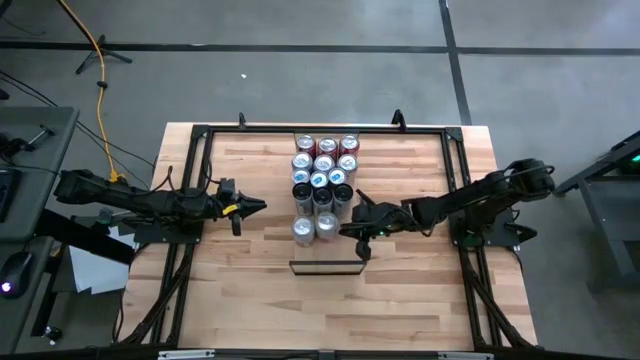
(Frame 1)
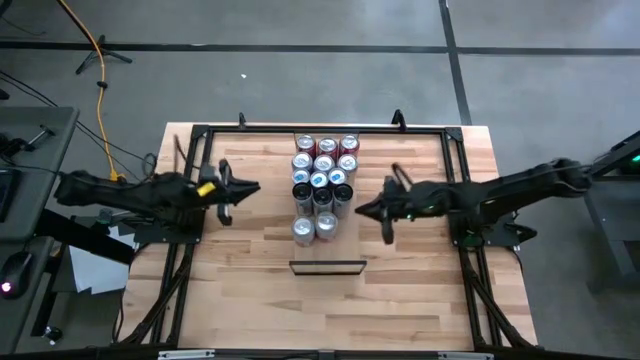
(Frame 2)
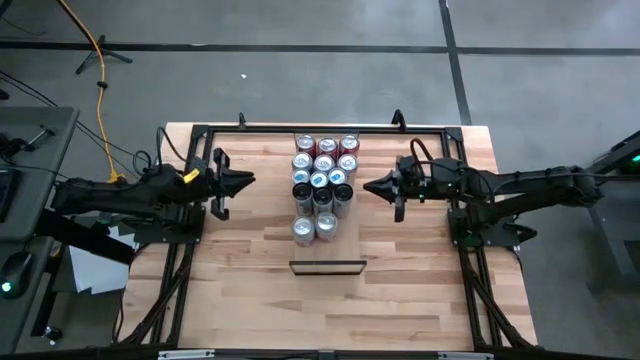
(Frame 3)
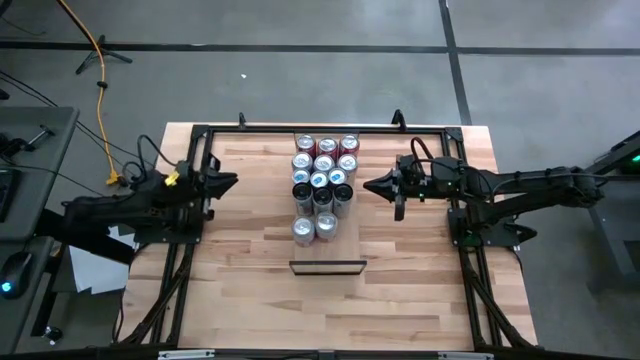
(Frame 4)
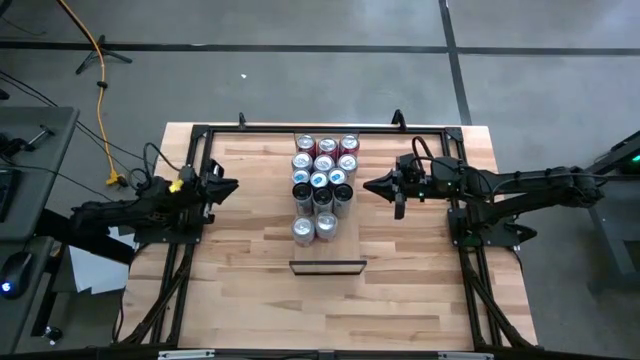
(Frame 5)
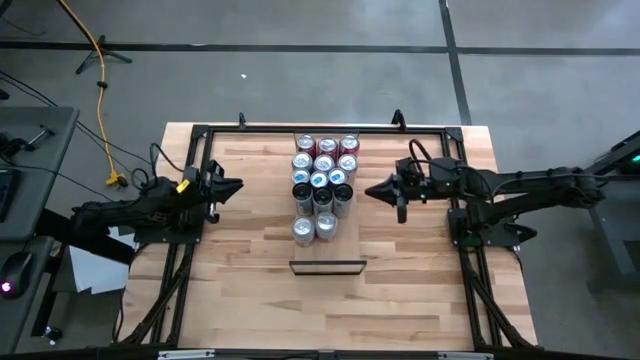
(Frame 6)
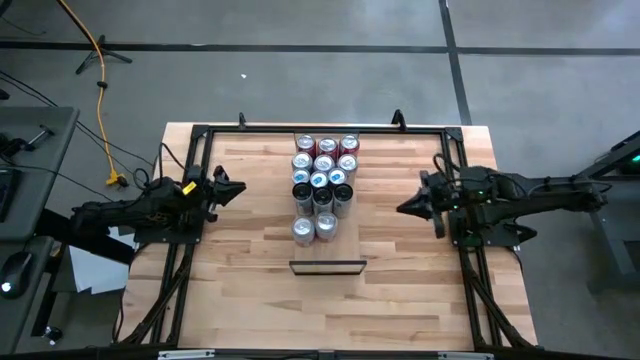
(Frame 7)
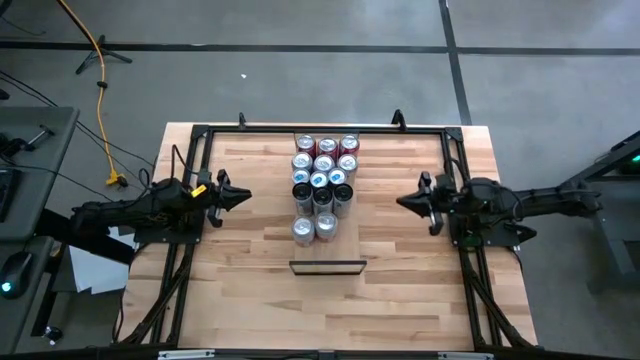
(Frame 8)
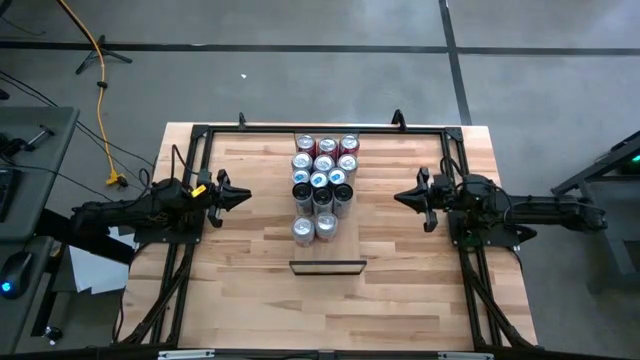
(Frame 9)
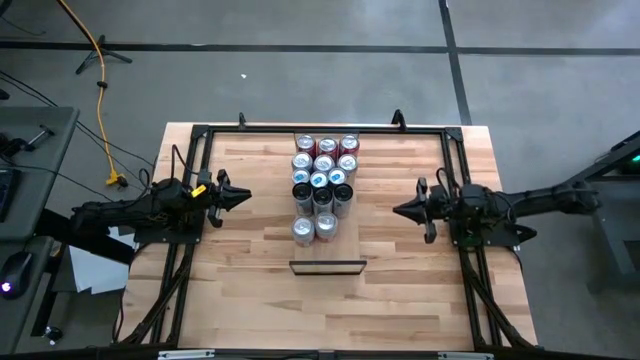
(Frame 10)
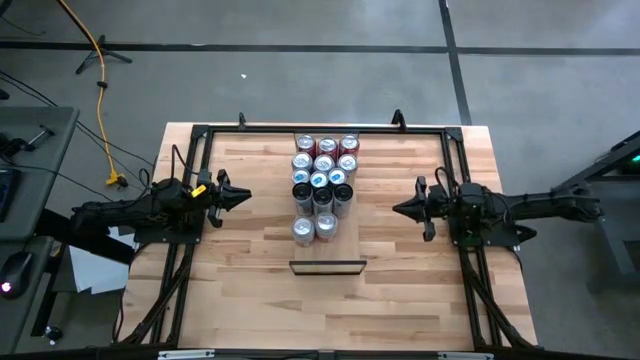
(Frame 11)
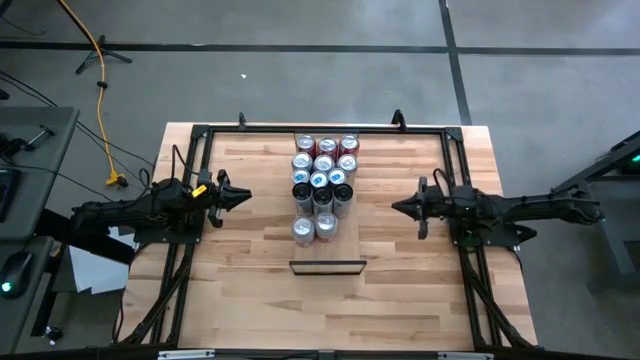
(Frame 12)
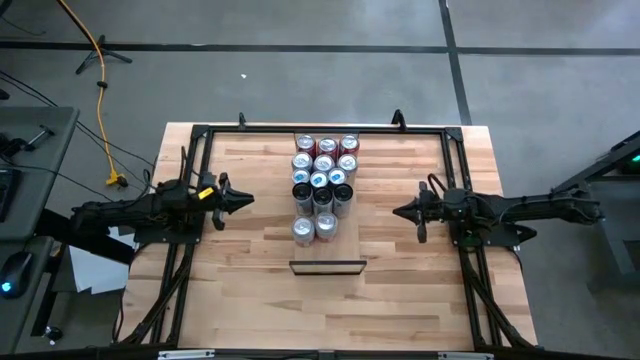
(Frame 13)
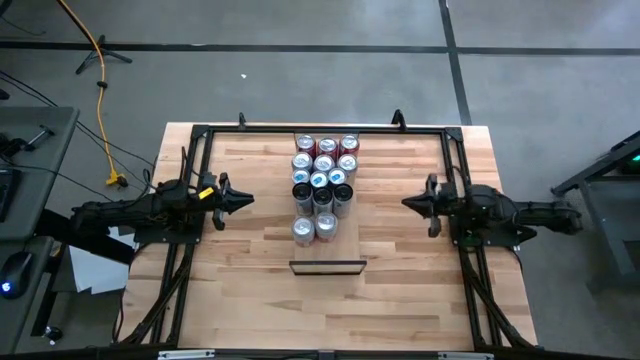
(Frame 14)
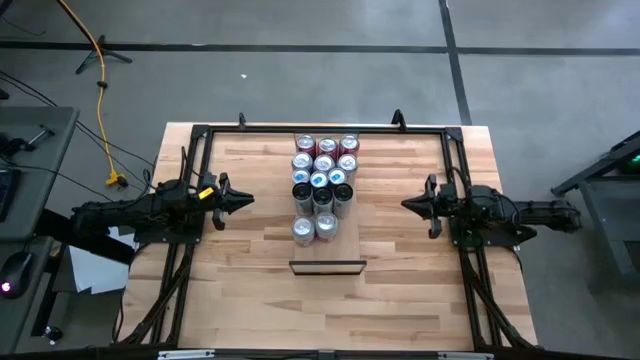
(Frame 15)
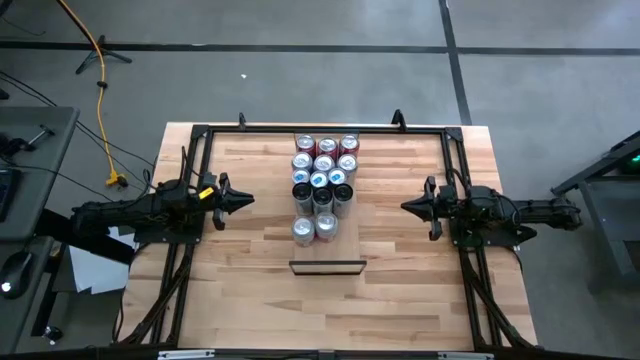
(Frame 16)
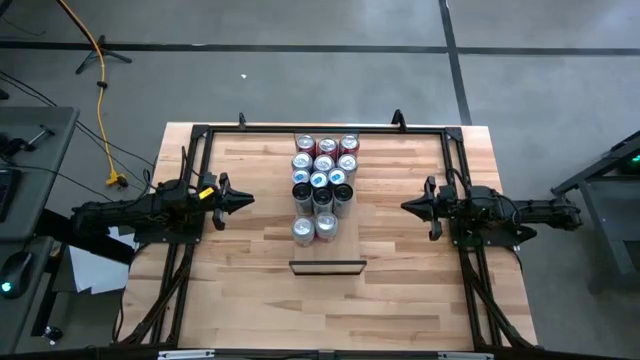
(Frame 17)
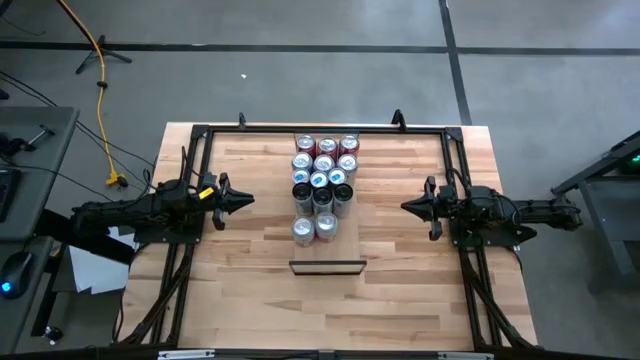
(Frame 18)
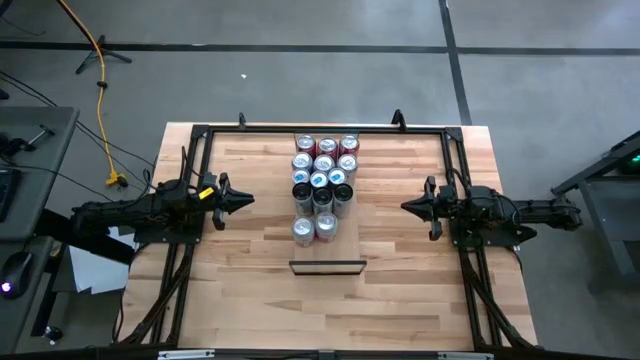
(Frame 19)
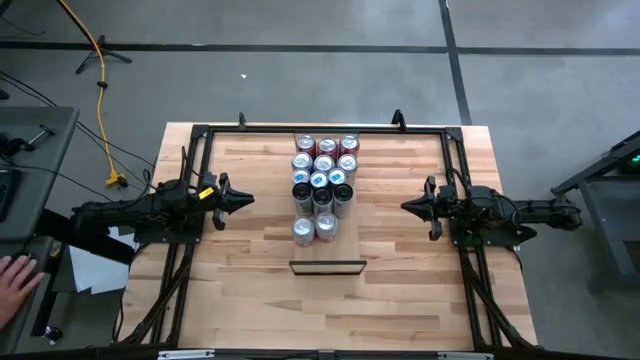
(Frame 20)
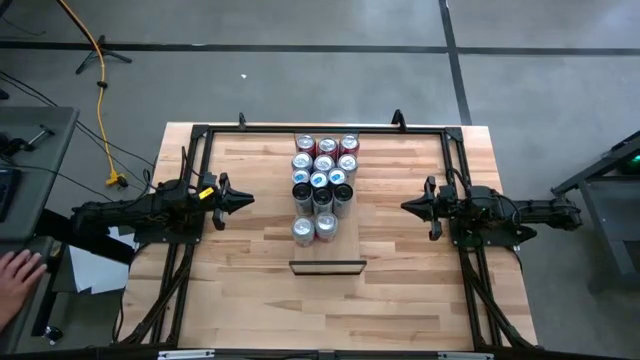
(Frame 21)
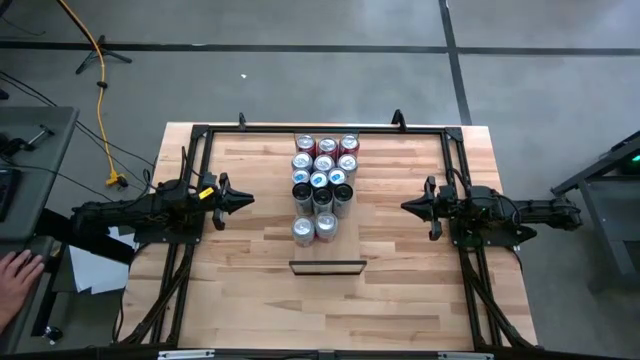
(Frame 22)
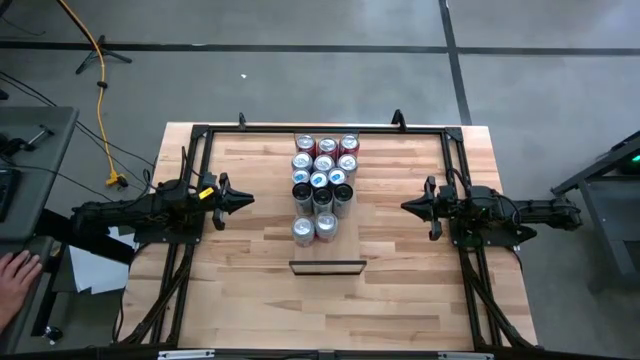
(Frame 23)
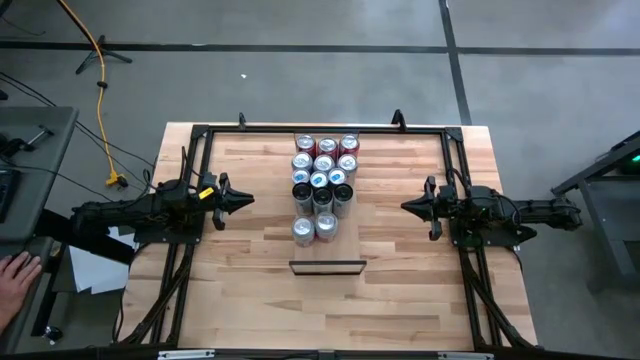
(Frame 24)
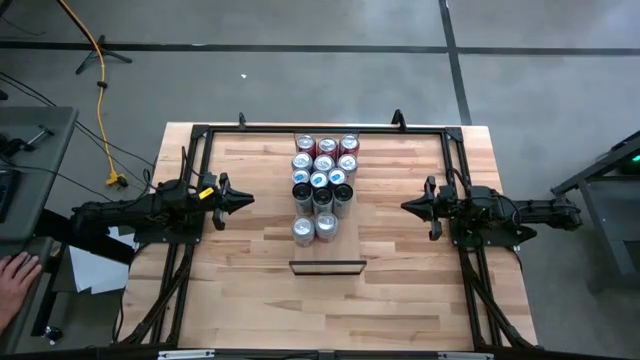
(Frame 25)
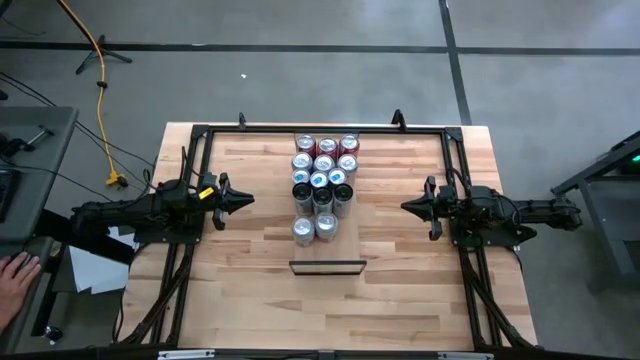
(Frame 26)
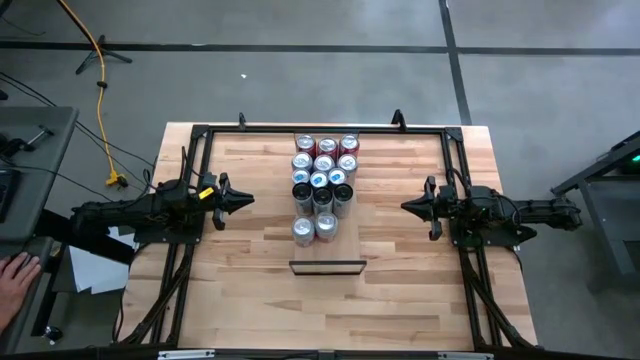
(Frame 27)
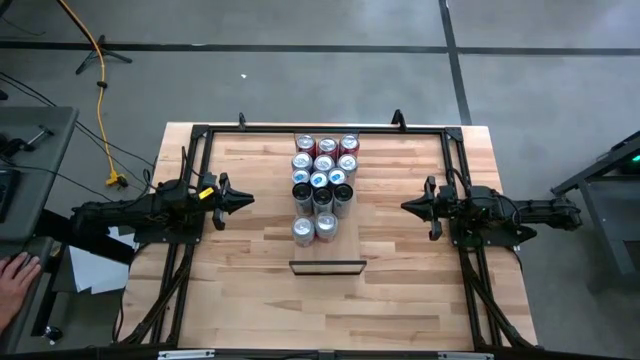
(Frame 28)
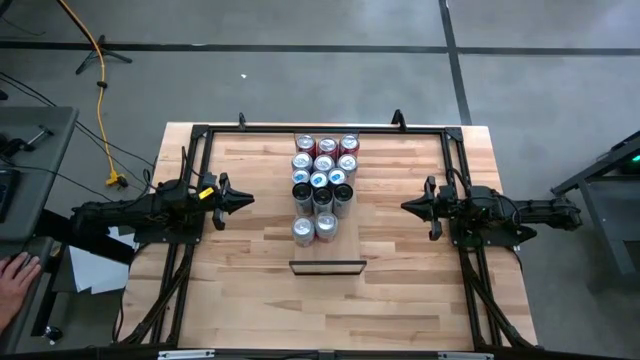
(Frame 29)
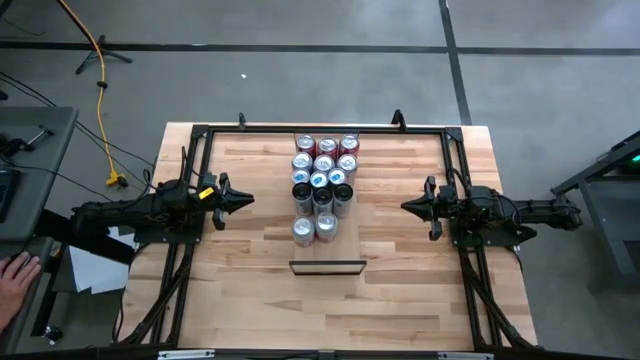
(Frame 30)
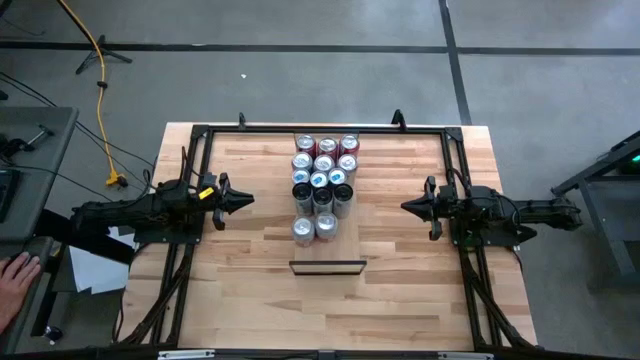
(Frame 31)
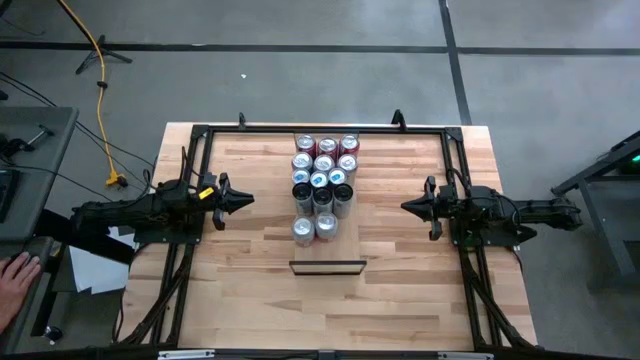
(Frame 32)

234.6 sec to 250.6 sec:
Task: Place canned beverage on shelf
Return to Home Position

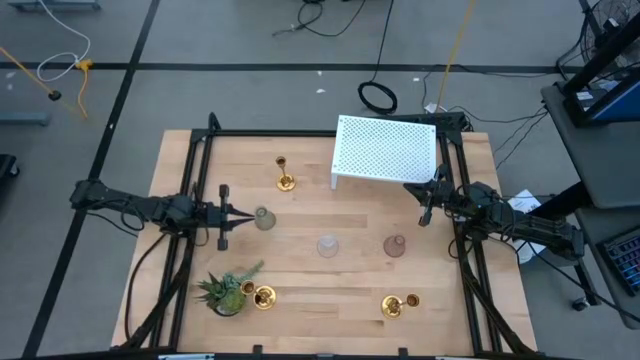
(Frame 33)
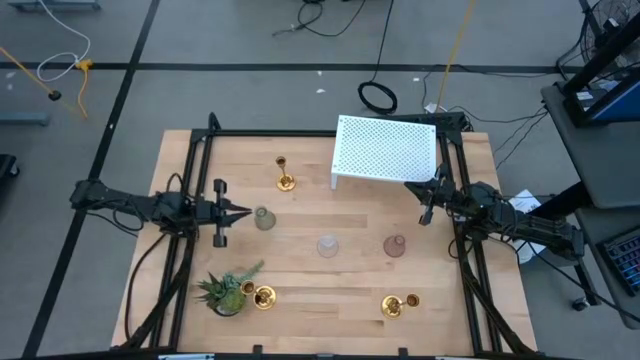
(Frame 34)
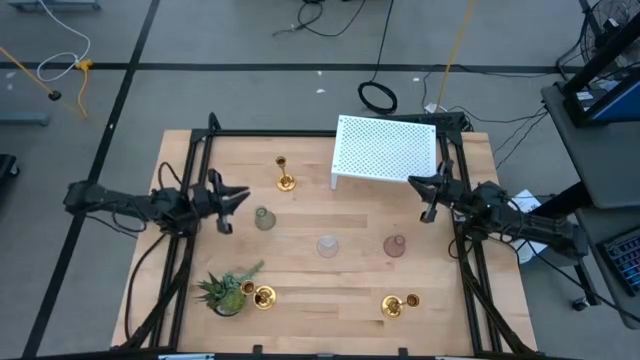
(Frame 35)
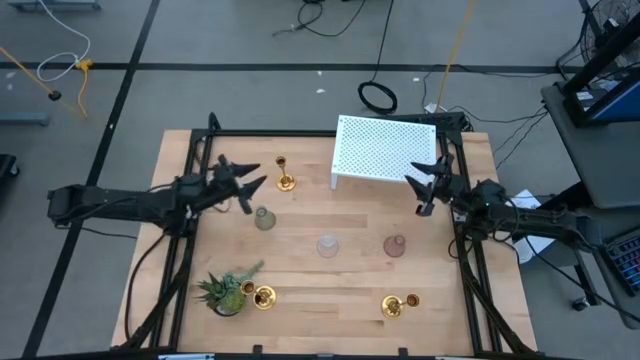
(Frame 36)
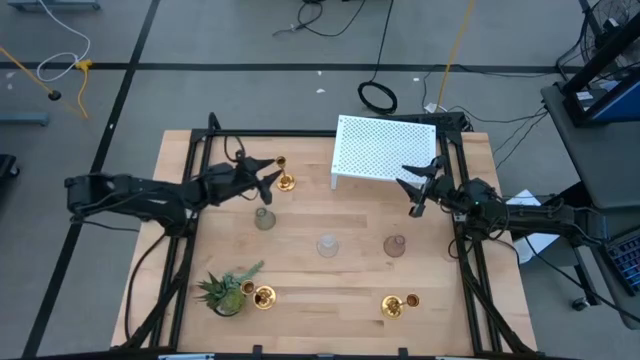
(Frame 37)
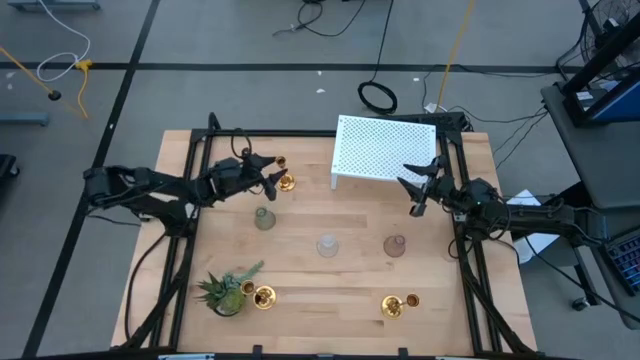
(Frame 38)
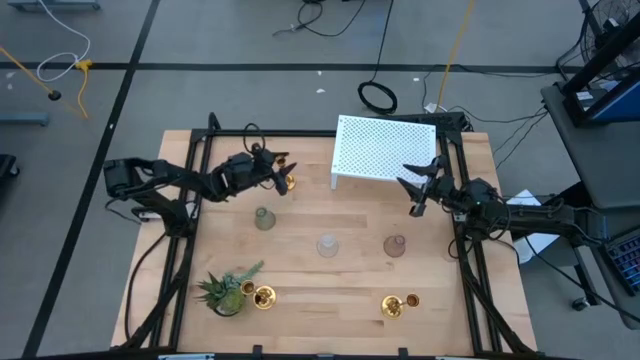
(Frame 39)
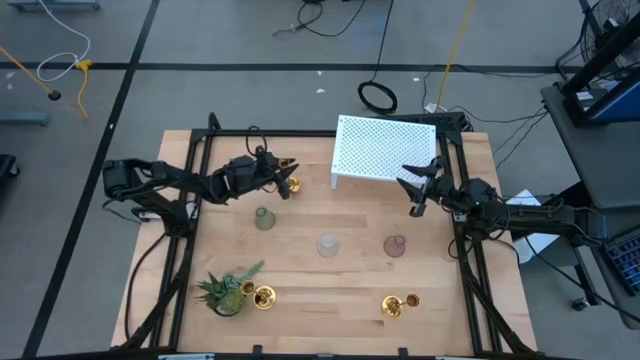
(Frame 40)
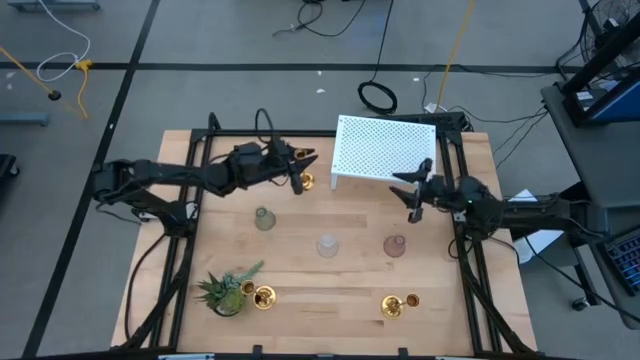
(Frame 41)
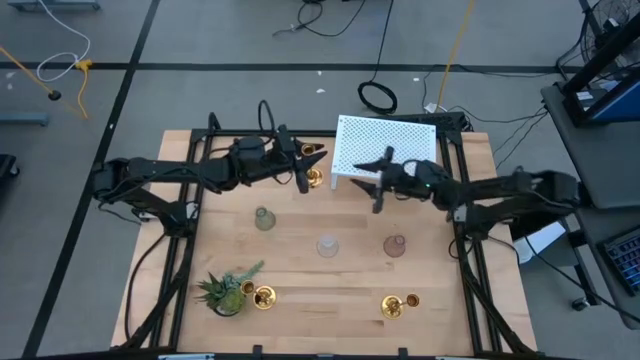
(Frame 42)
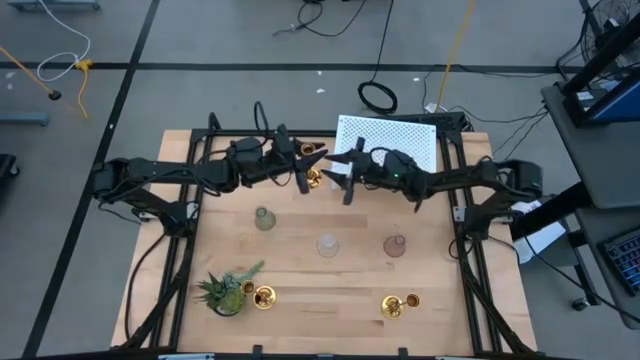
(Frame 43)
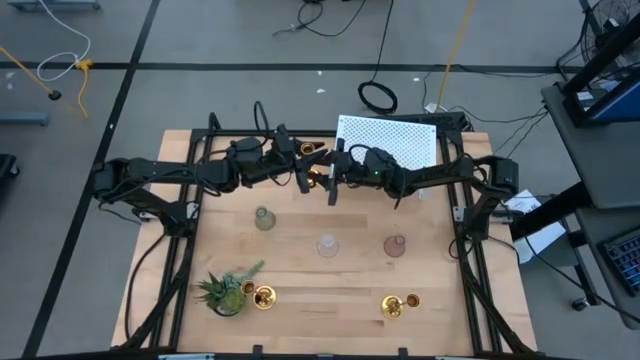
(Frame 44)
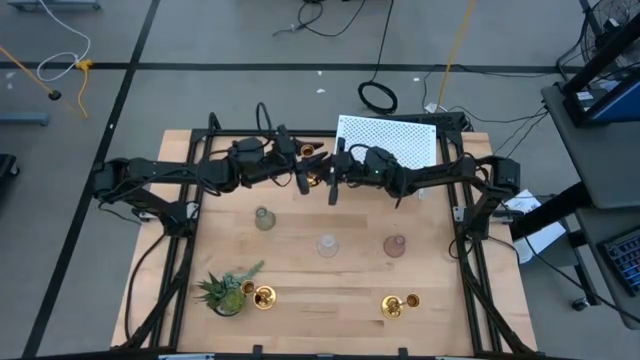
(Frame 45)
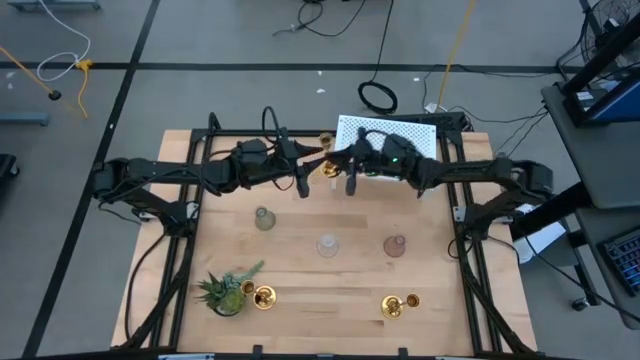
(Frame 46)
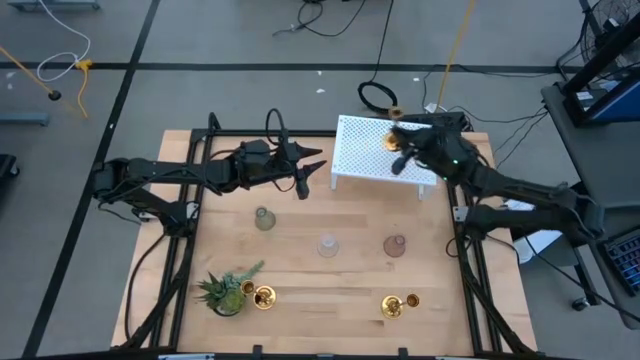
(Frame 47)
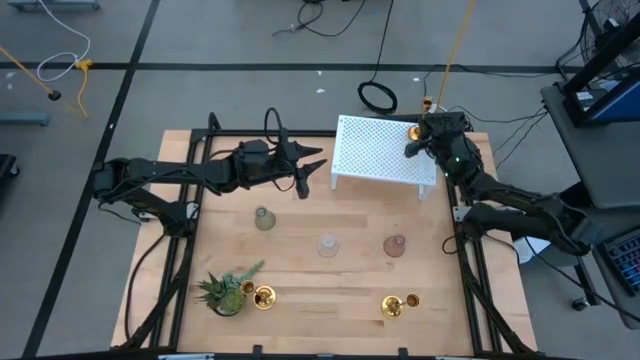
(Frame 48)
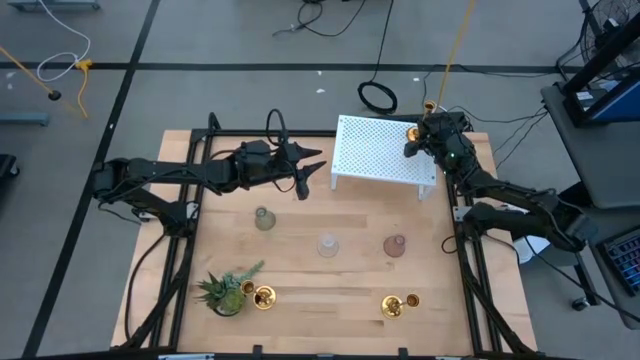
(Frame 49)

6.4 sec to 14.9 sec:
Task: Pick & Place candle stick holders
Put the top gold candle holder on the shelf
